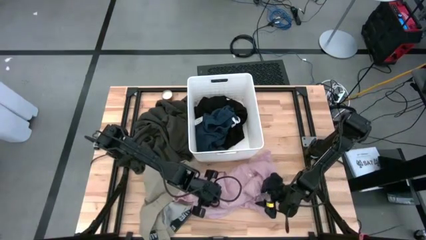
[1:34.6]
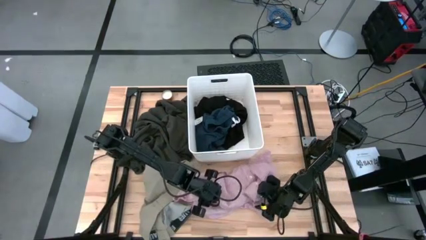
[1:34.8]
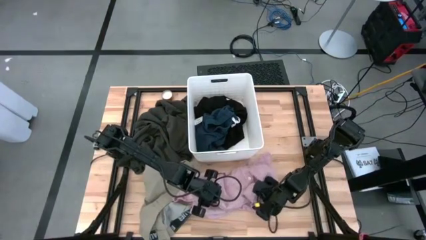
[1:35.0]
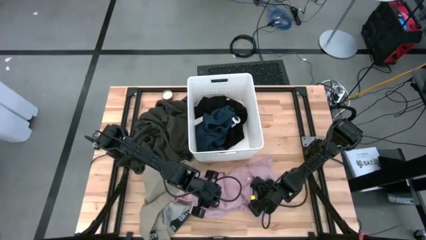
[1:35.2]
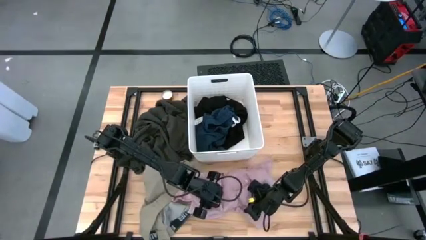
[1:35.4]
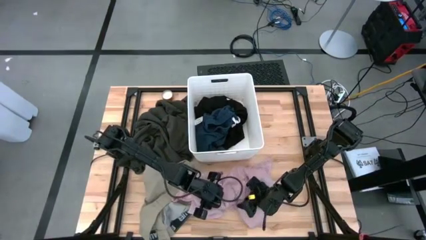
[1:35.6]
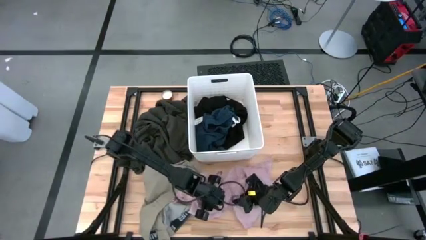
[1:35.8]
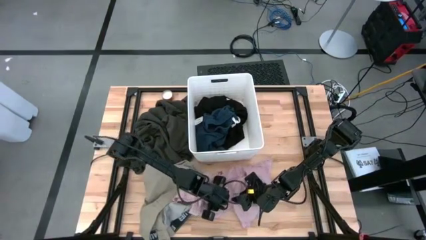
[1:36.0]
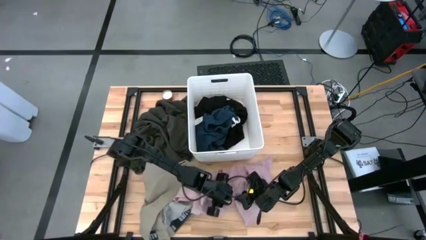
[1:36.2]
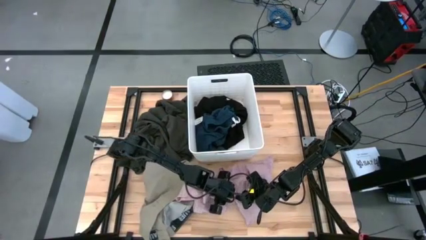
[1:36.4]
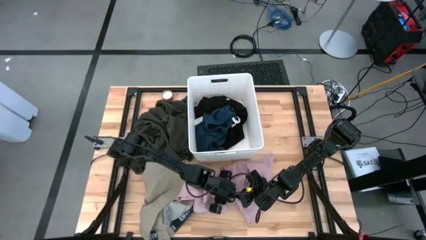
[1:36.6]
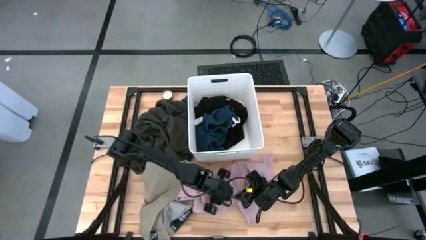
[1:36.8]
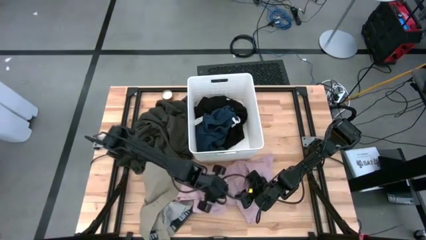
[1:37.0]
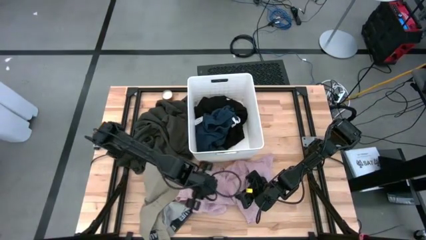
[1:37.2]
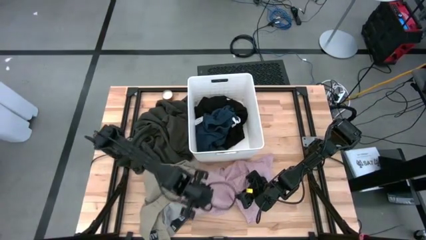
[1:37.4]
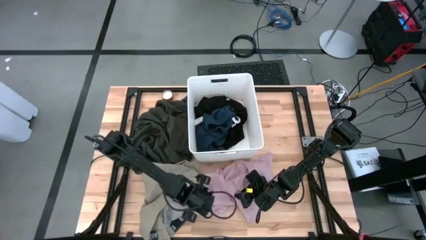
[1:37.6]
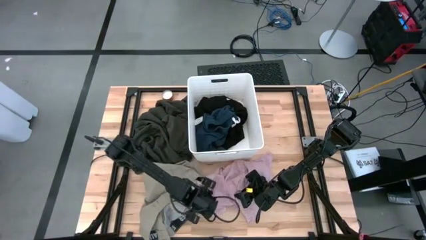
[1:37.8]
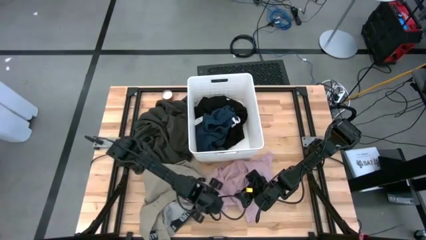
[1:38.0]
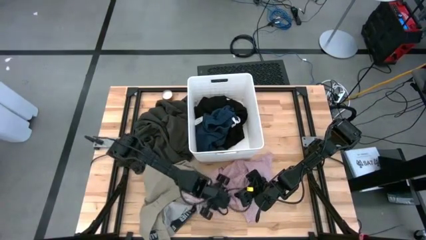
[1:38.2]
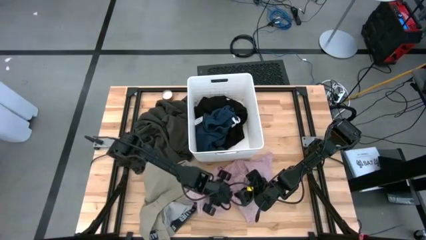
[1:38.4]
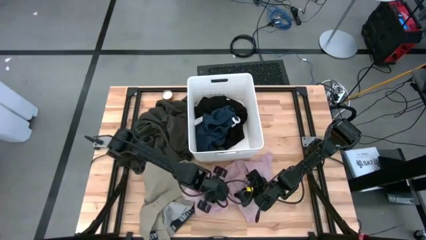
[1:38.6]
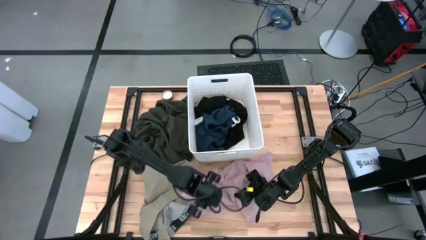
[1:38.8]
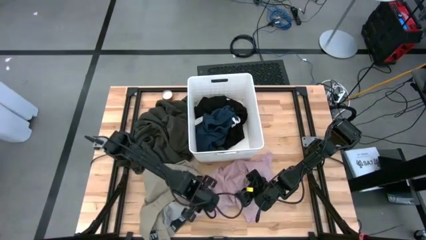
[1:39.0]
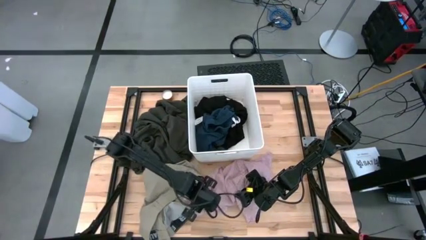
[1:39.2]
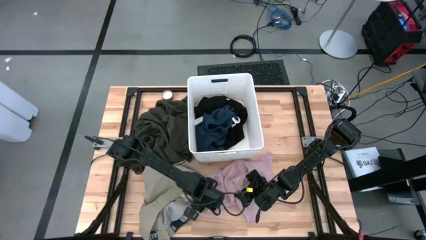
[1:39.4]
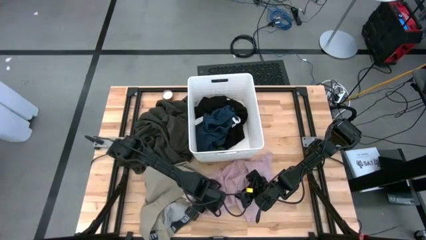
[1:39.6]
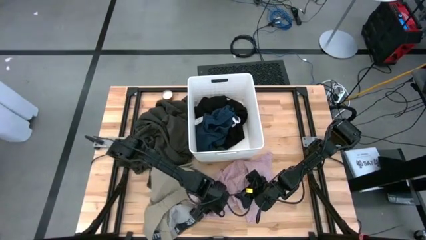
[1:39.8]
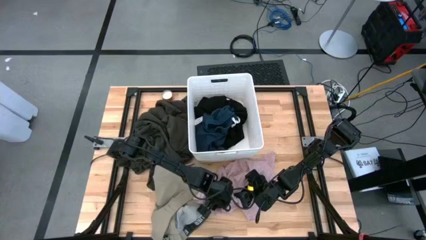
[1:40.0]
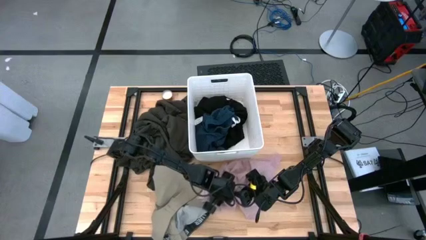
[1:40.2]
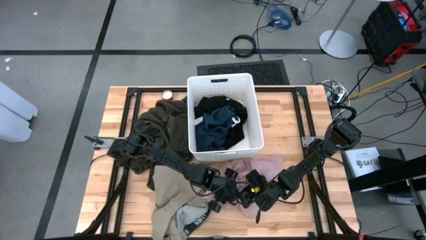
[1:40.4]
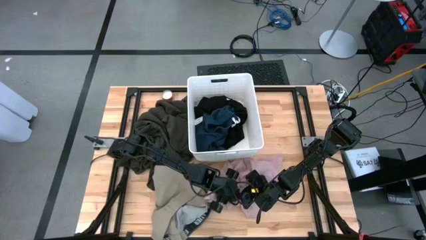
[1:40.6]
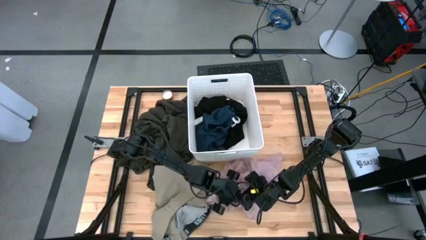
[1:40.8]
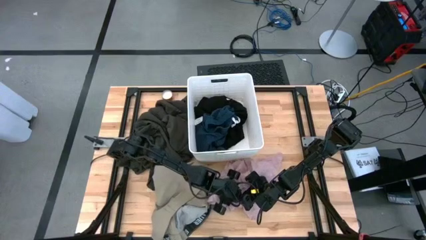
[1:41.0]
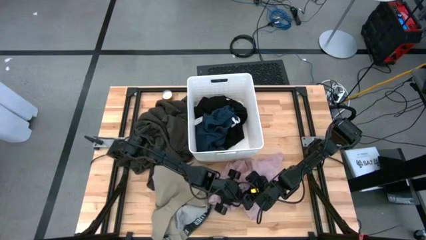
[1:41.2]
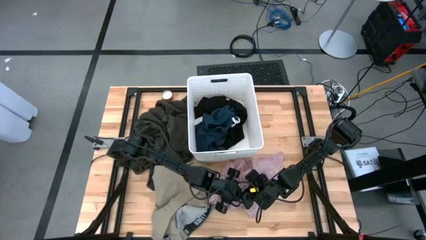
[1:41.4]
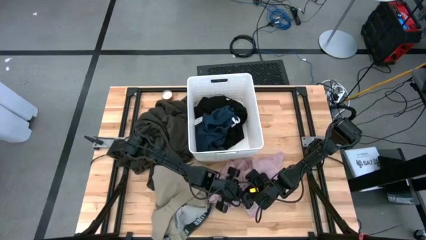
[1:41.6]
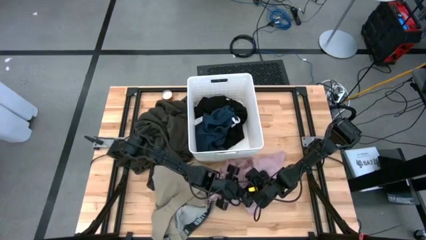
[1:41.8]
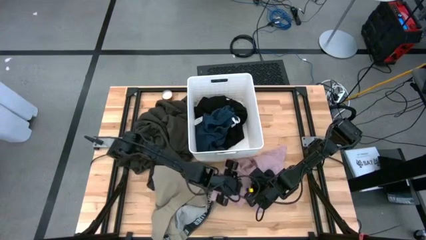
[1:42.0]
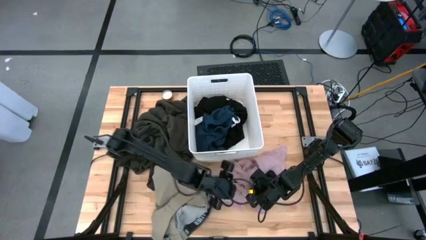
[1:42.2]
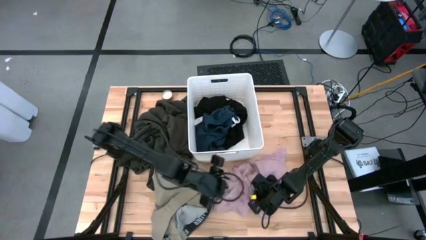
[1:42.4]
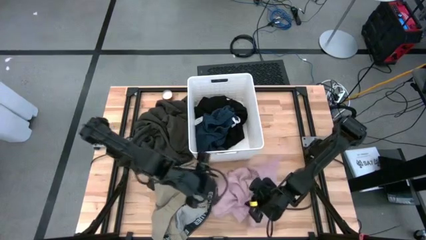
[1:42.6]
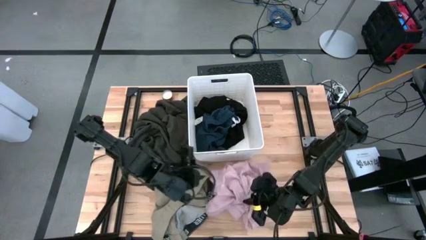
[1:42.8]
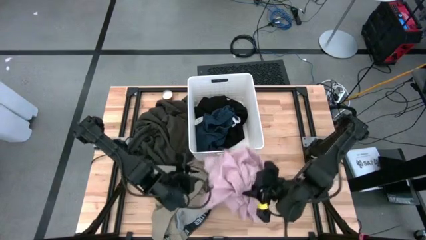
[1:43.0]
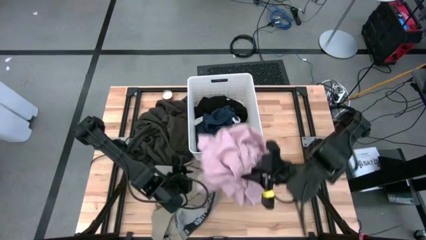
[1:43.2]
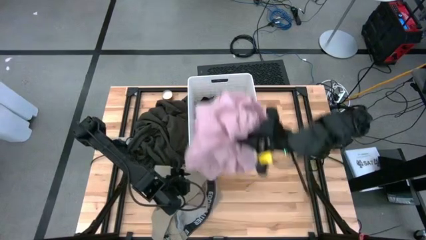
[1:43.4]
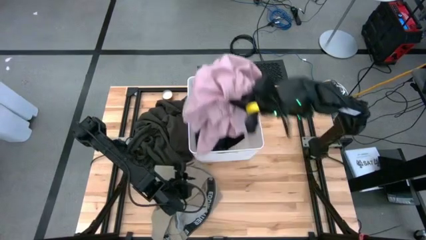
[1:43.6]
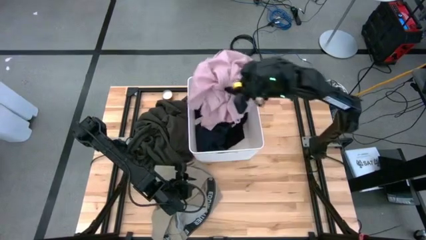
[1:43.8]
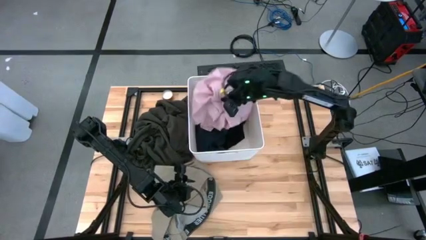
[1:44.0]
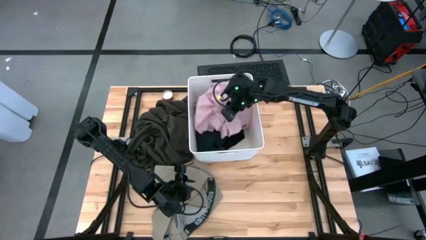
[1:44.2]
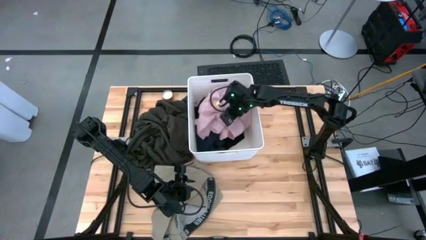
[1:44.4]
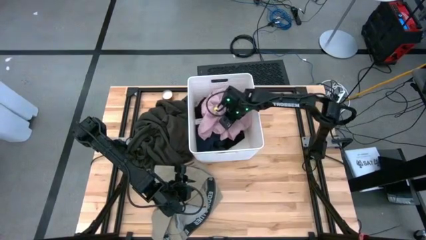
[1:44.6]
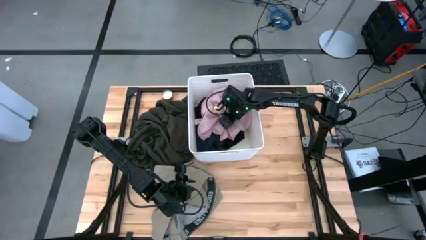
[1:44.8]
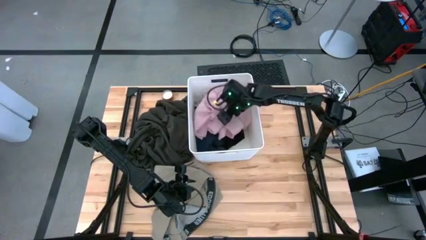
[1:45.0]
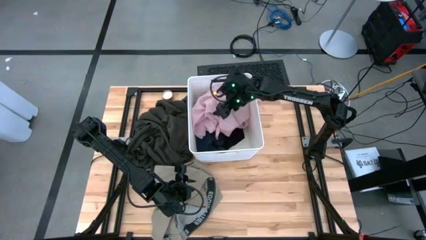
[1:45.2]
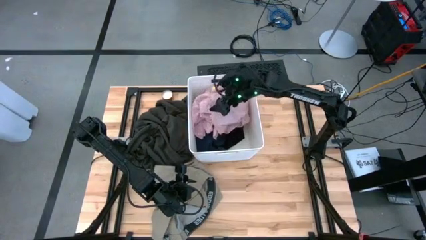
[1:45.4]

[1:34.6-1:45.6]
Task: Sort clothes
Put the pink polo into the laundry bin

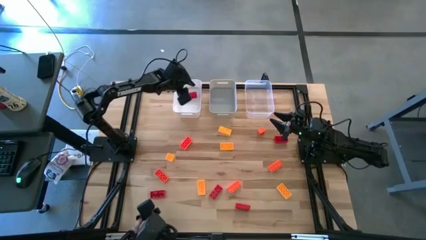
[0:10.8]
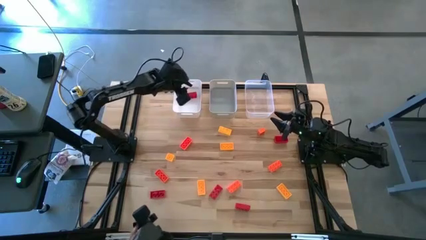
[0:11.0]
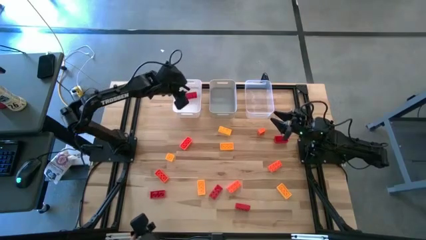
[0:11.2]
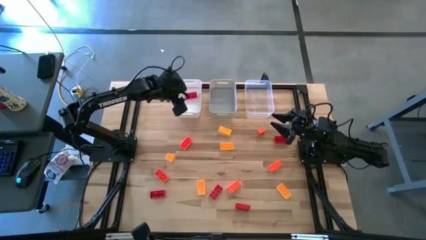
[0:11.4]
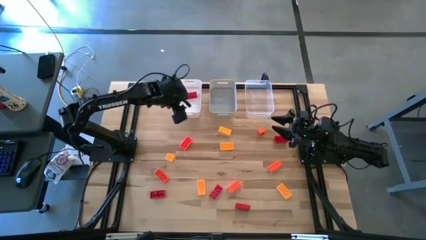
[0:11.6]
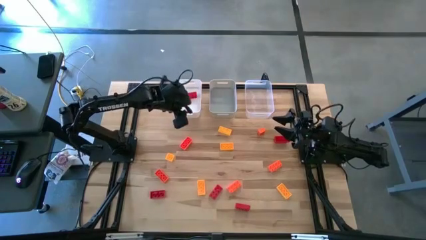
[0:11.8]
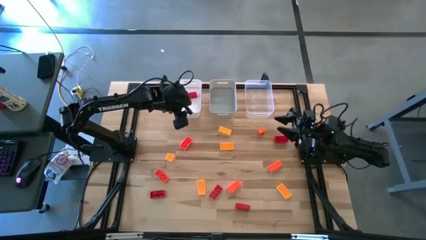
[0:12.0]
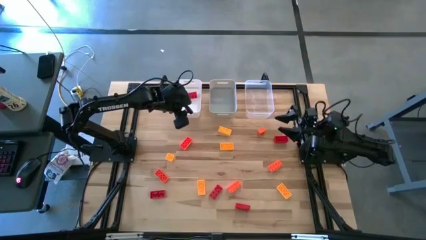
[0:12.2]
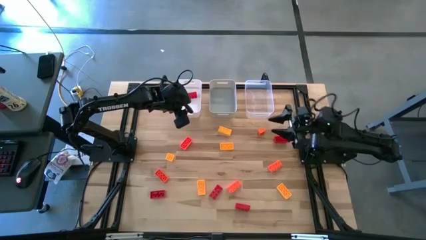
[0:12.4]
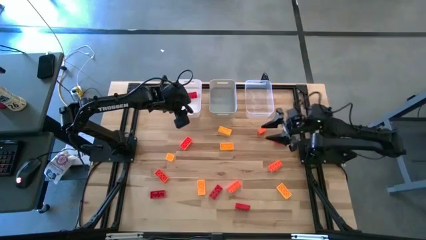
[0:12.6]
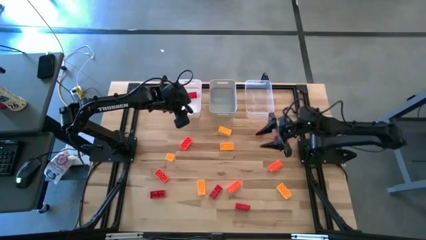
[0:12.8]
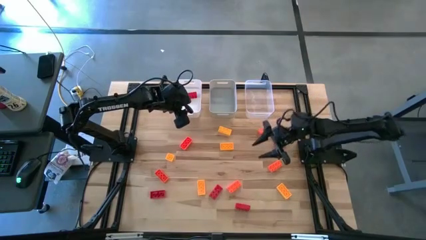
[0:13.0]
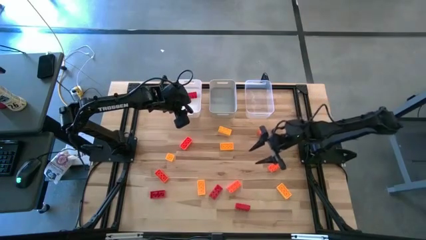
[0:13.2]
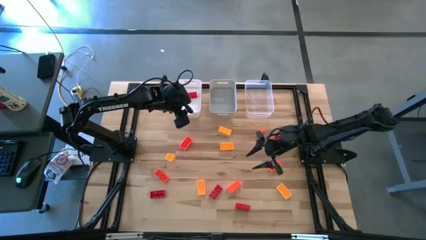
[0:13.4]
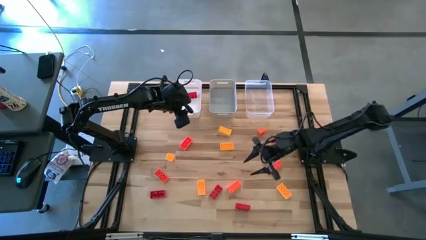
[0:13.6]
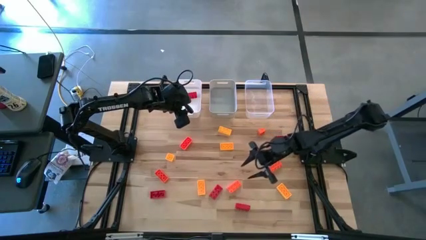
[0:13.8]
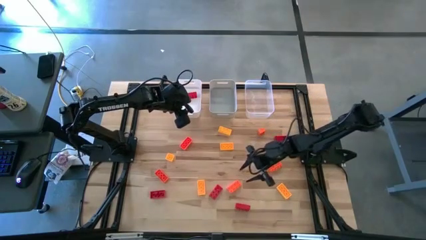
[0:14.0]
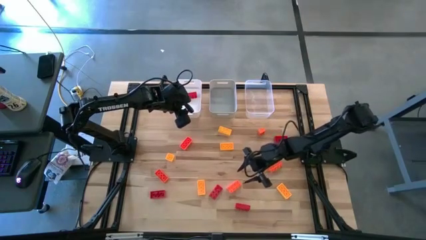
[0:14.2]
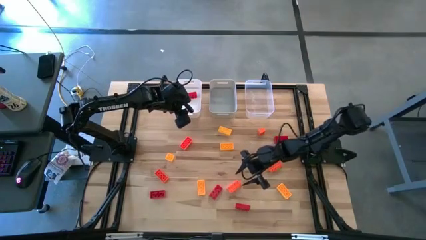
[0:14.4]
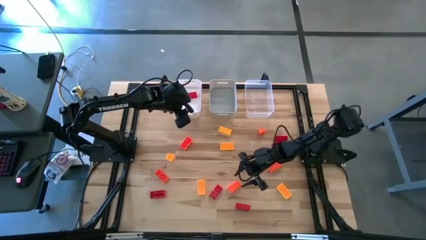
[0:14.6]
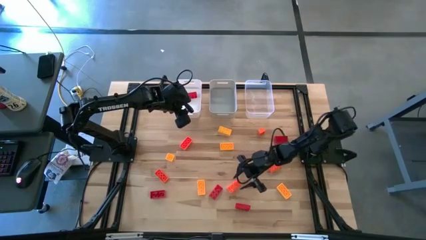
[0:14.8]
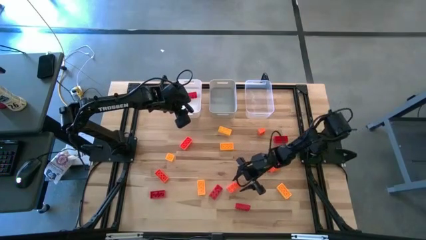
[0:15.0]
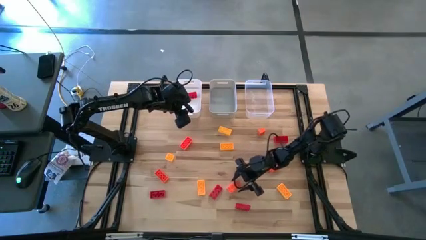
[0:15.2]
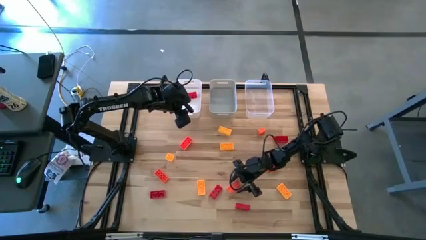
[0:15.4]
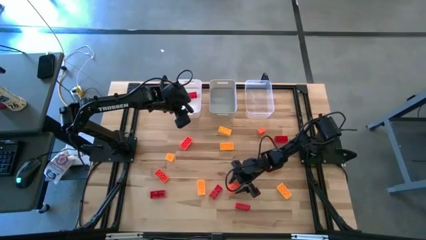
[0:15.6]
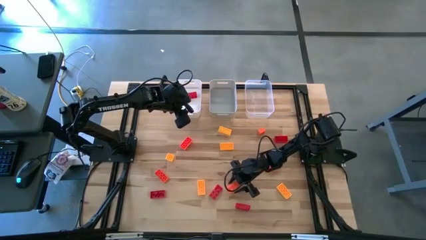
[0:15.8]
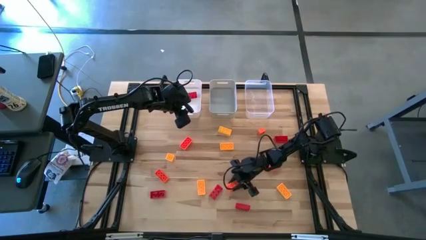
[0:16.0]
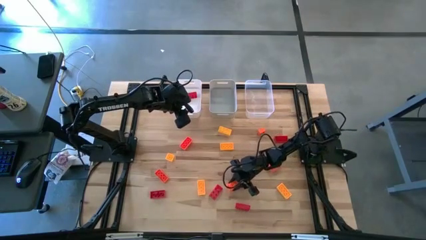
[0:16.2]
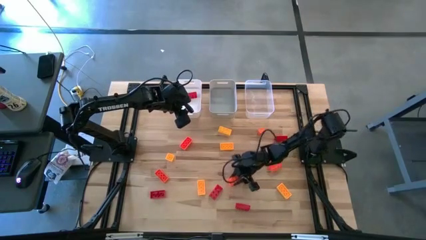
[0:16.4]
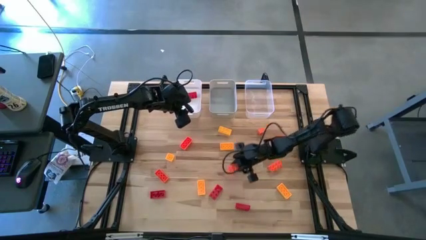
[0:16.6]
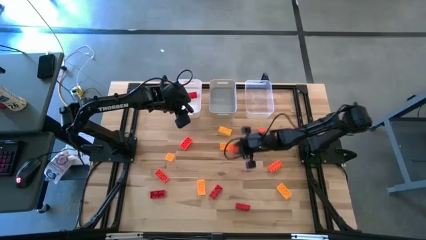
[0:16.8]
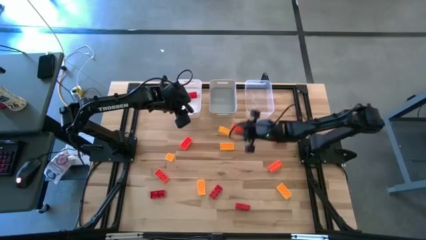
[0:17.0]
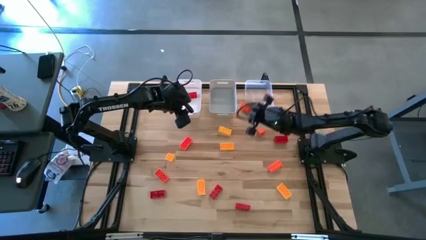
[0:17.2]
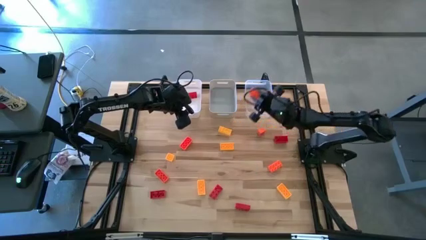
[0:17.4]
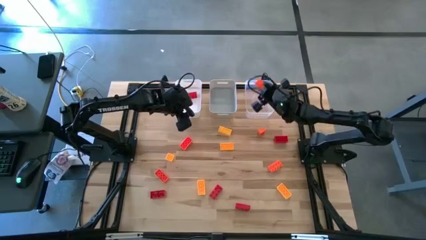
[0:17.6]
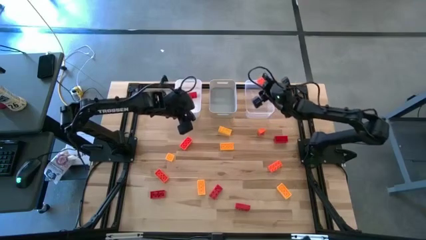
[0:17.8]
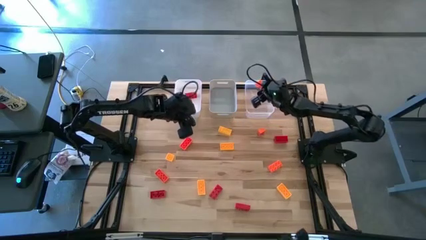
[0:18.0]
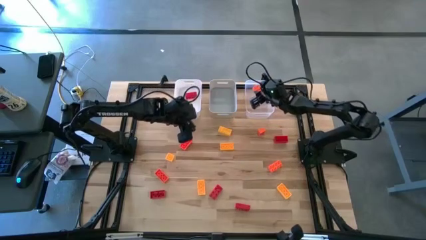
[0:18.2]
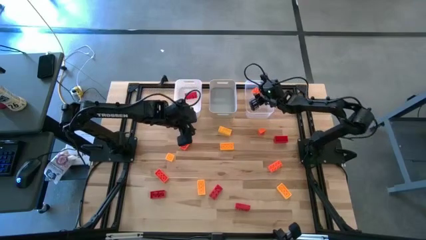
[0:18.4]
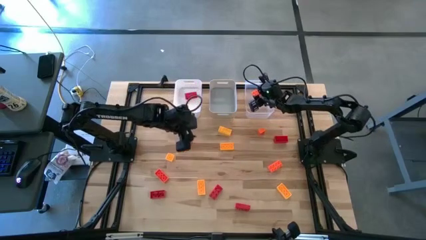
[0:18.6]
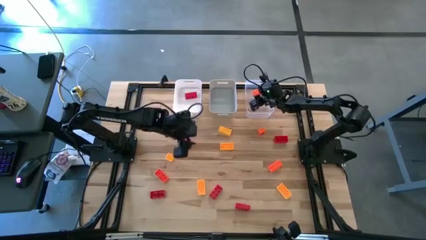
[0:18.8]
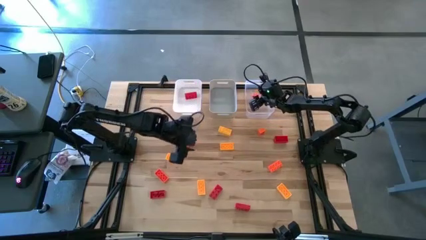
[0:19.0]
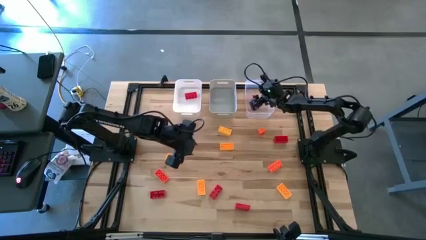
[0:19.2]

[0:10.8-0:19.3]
Task: Sort & place blocks by color
Put the orange game piece into the transparent bin
